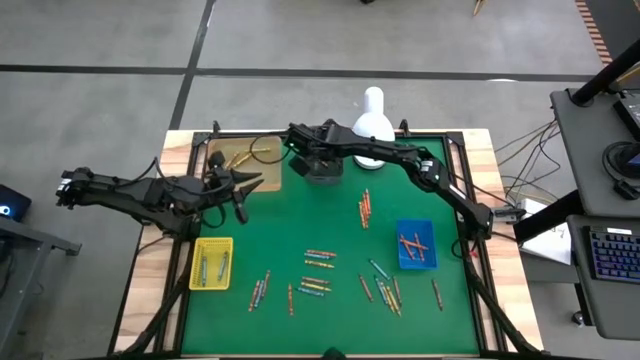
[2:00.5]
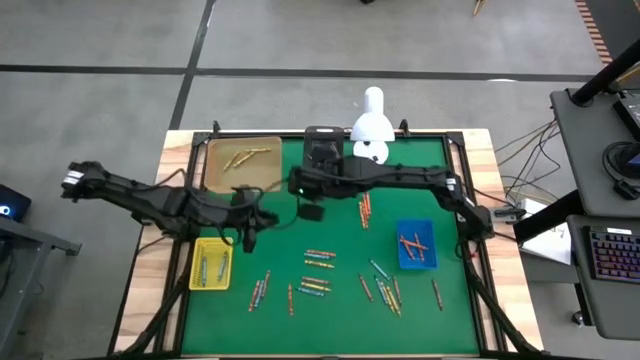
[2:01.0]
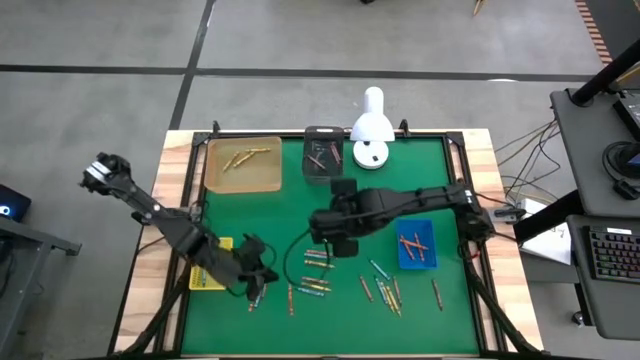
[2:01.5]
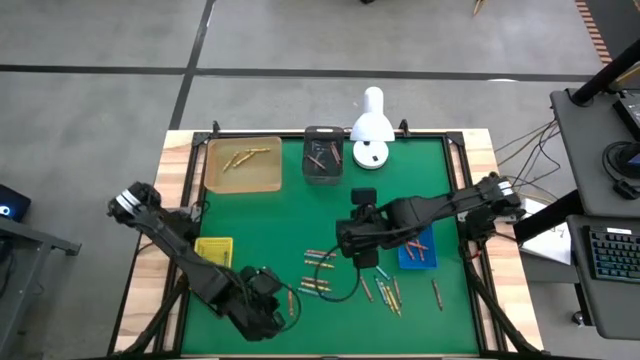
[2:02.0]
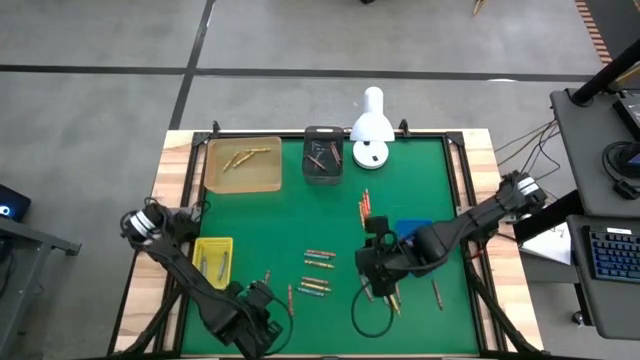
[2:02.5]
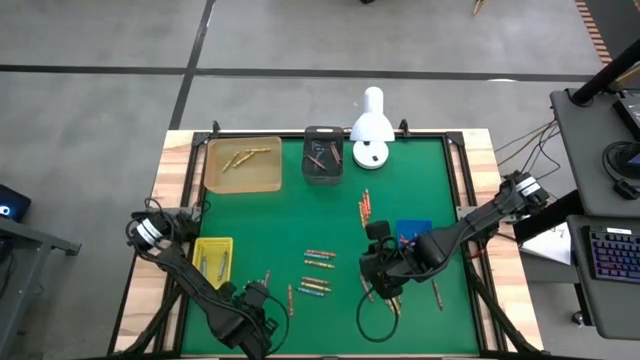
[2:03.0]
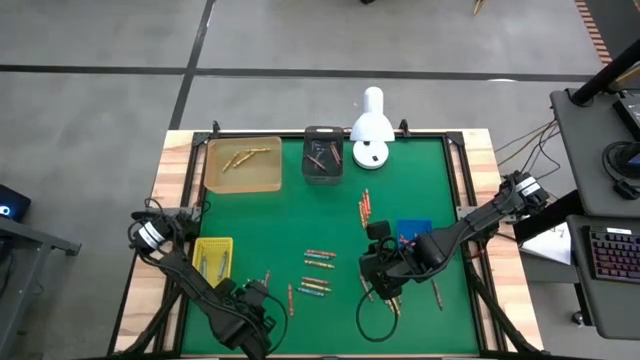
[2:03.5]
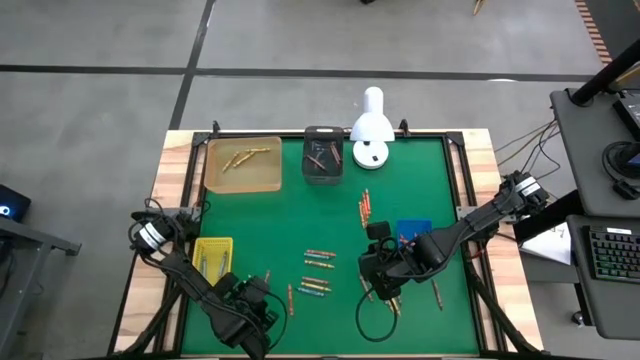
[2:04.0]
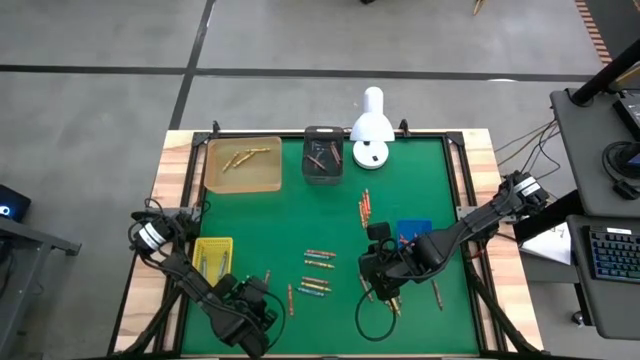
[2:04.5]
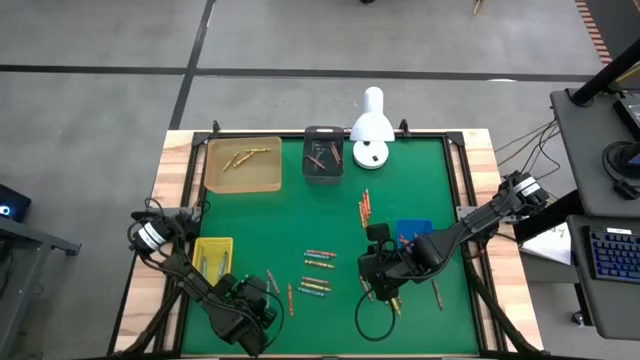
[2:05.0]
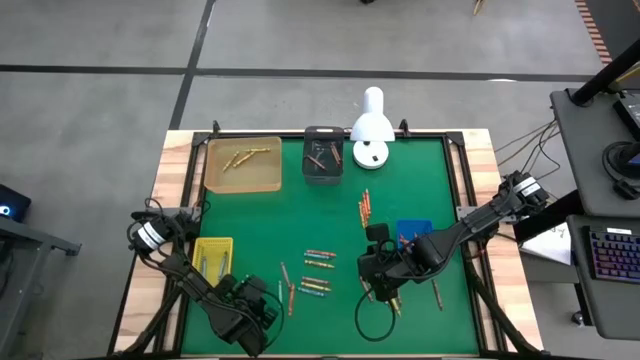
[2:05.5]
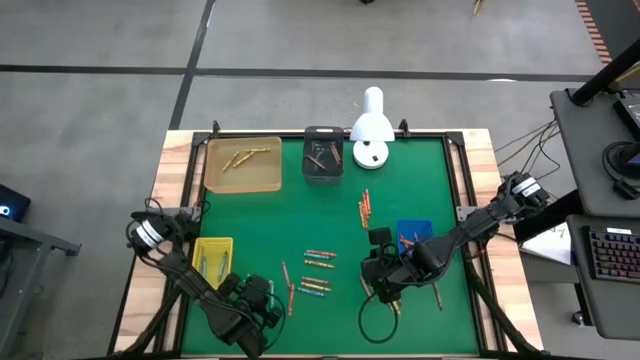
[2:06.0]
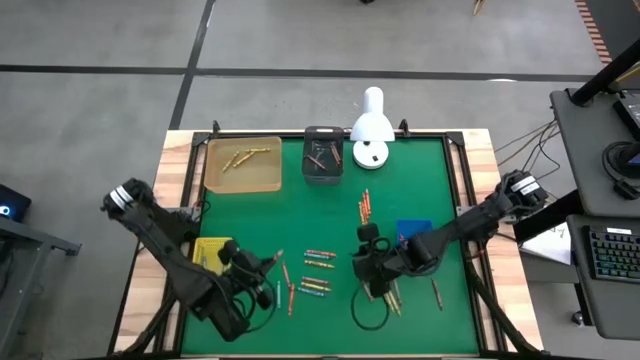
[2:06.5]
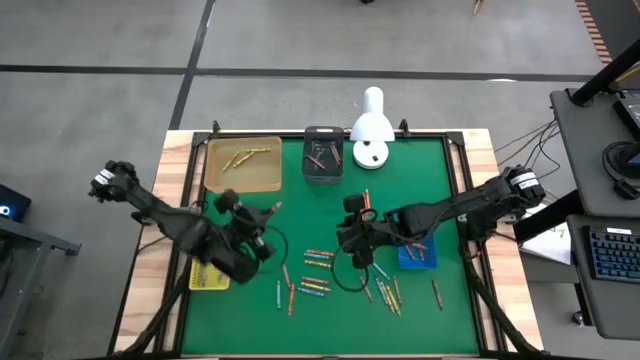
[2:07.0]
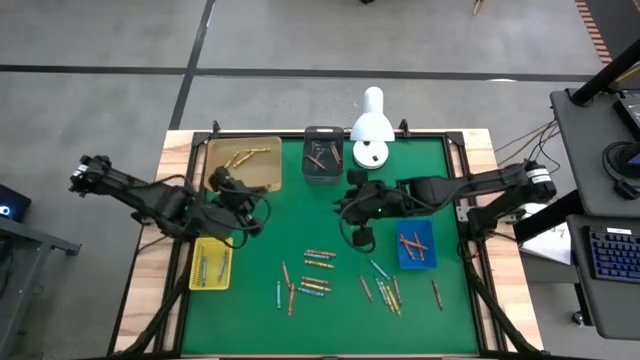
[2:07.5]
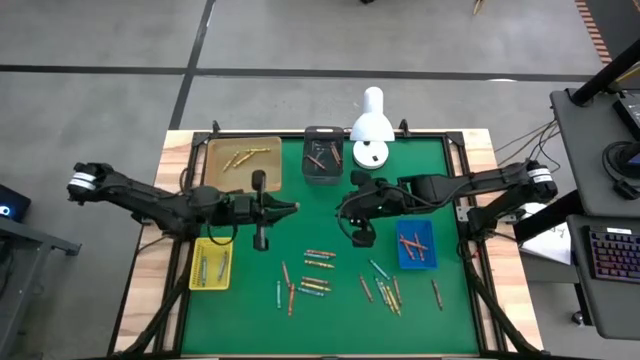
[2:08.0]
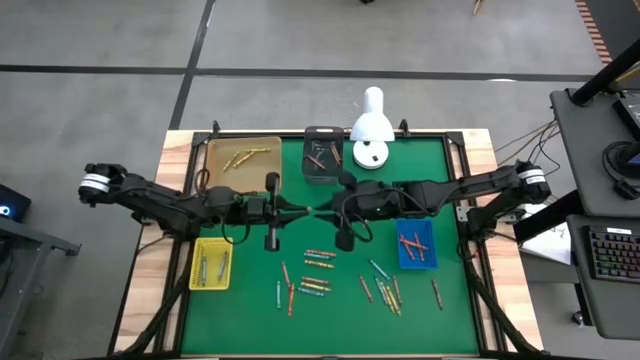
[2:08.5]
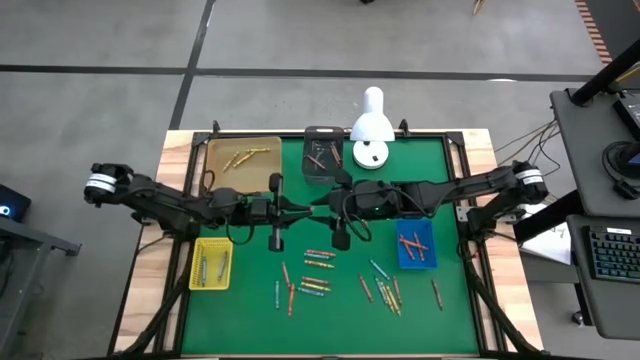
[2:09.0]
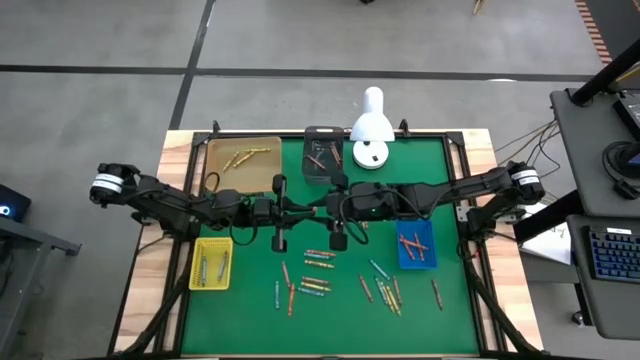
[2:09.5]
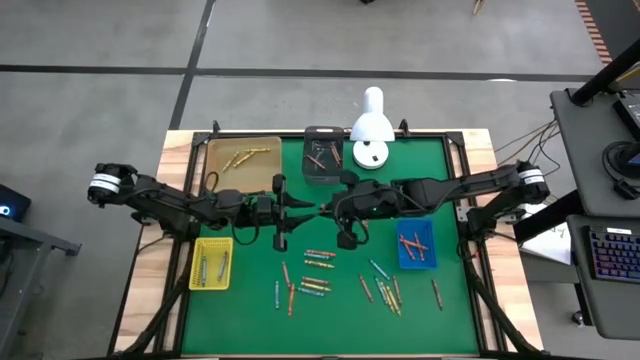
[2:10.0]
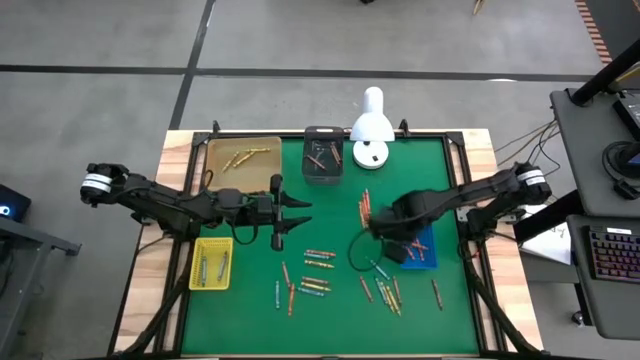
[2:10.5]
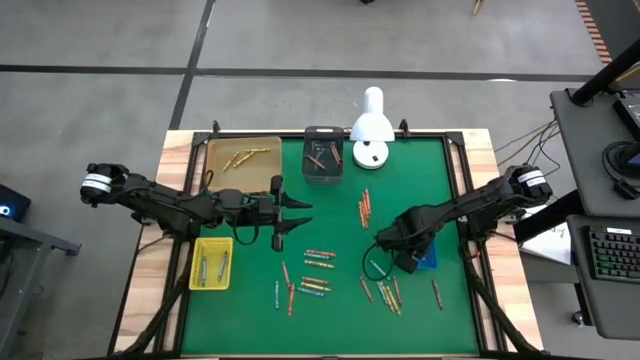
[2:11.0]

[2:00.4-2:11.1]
Task: Sort crayons
Put the orange crayon into the blue bin

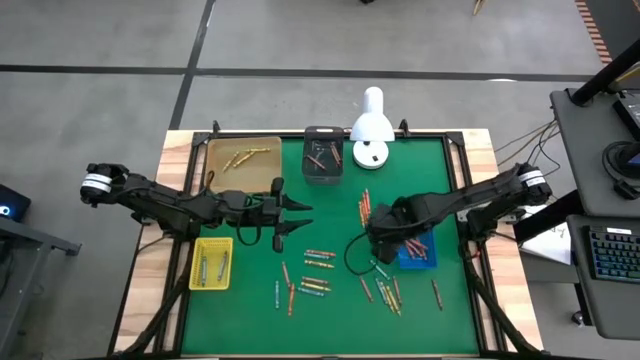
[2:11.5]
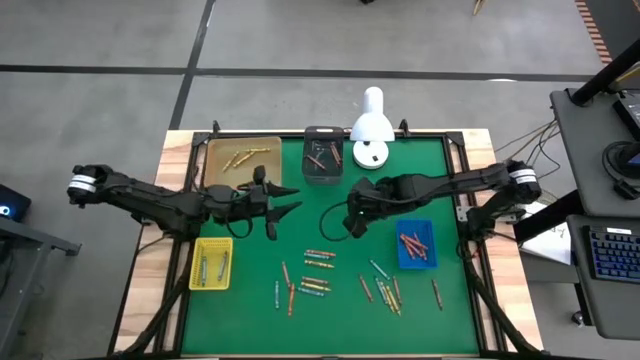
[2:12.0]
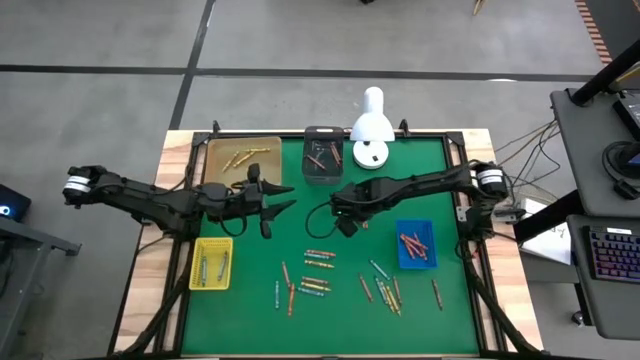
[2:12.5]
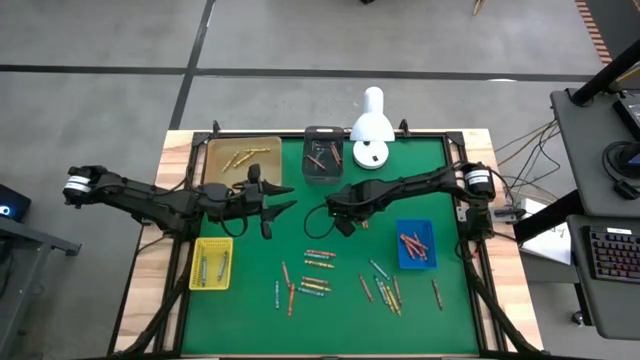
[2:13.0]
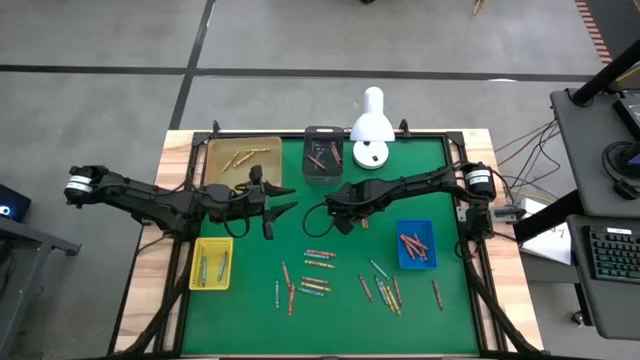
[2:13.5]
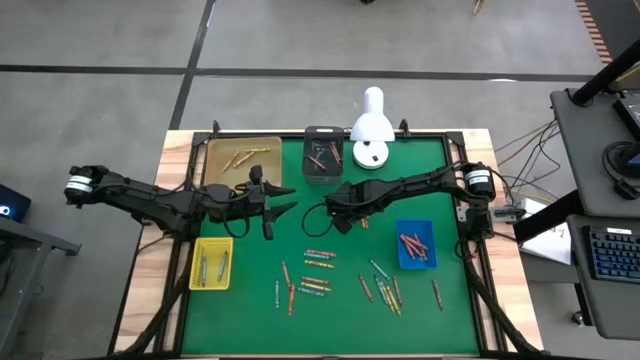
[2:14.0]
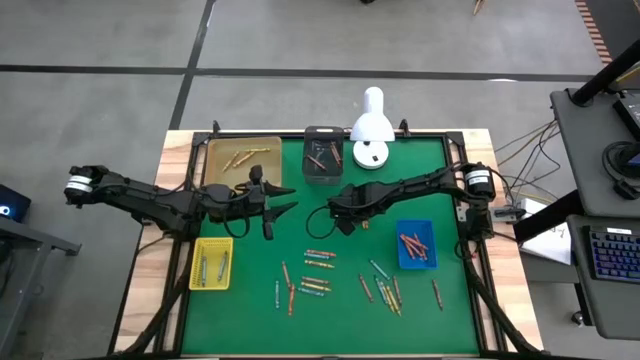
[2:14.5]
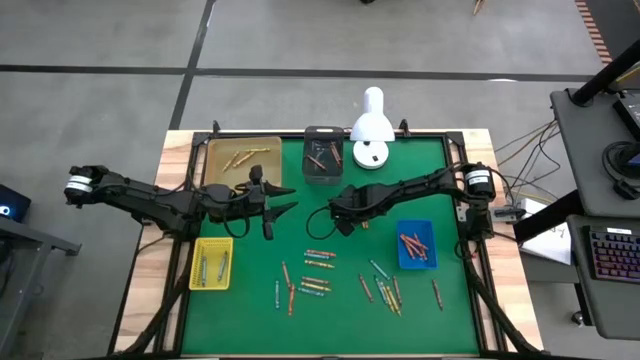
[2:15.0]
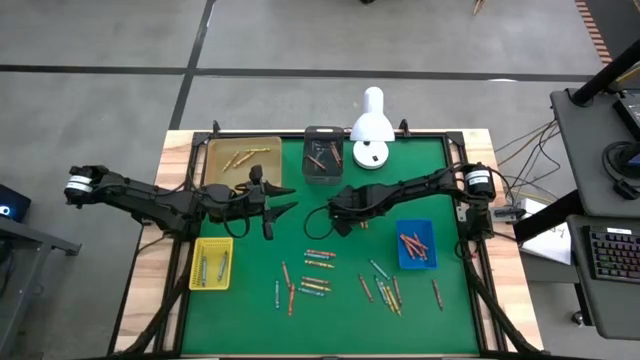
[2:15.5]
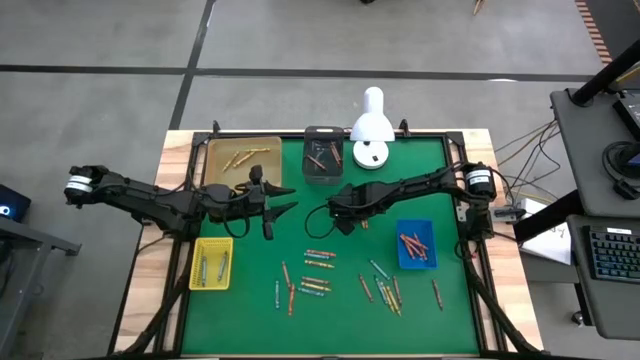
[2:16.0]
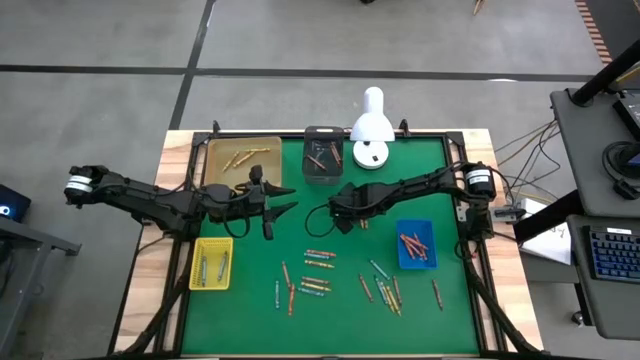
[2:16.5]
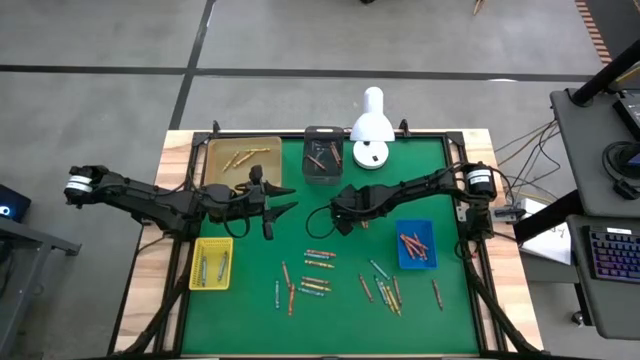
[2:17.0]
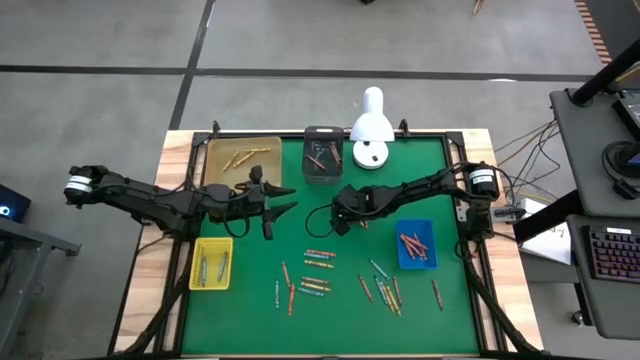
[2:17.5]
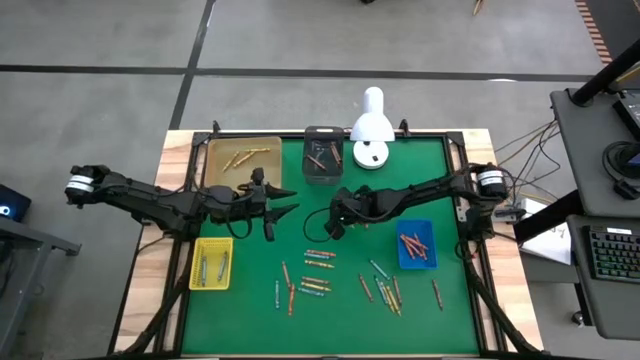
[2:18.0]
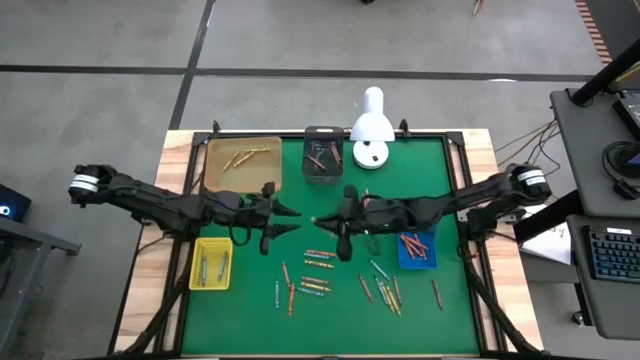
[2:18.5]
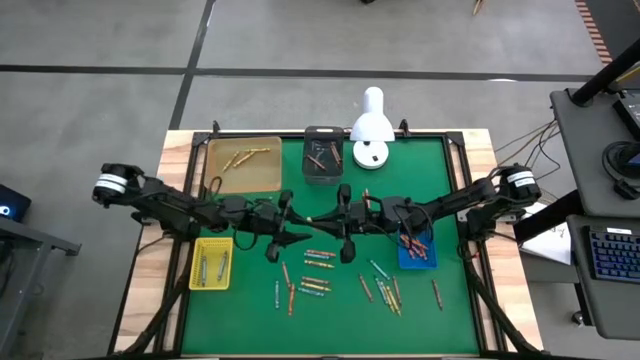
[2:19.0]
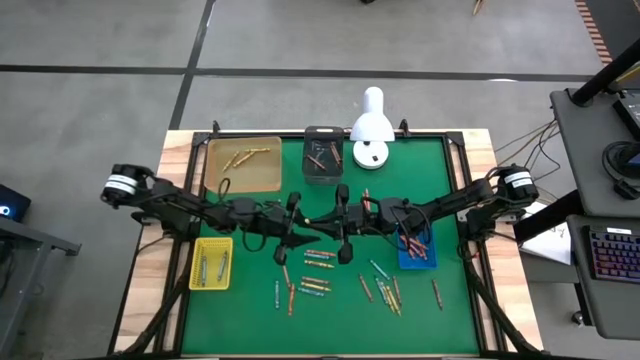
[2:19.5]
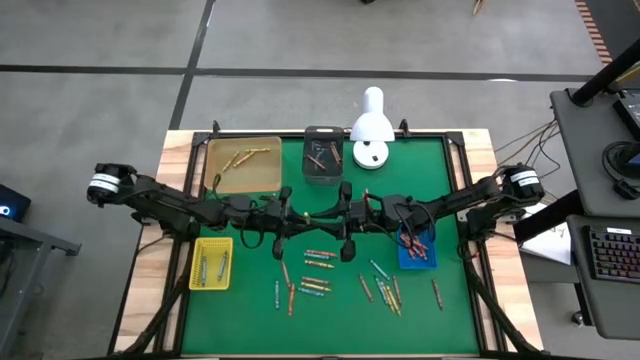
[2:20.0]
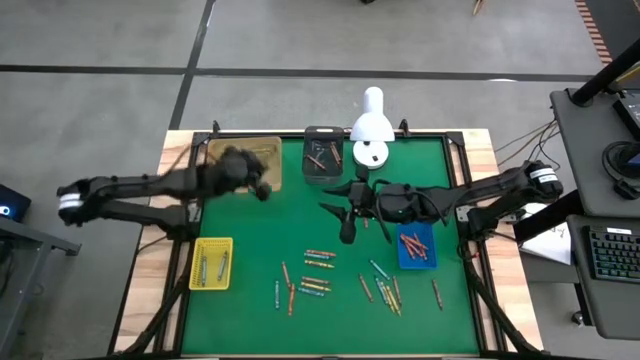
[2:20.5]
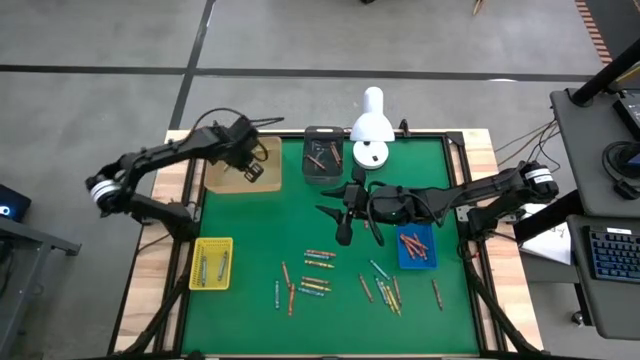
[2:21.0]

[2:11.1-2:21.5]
Put the green crayon into the orange bin

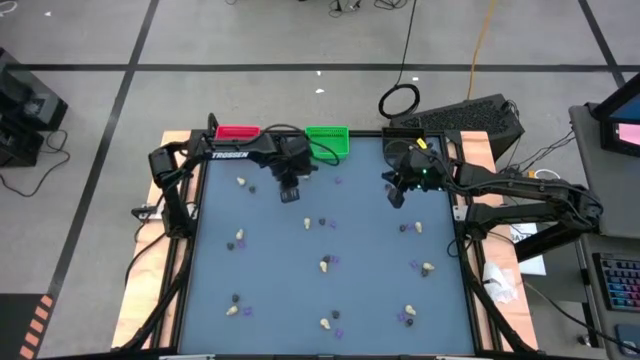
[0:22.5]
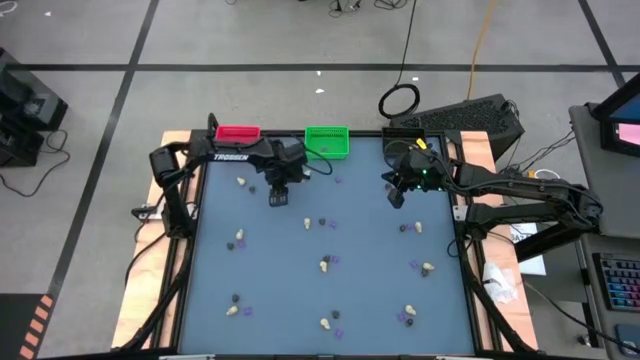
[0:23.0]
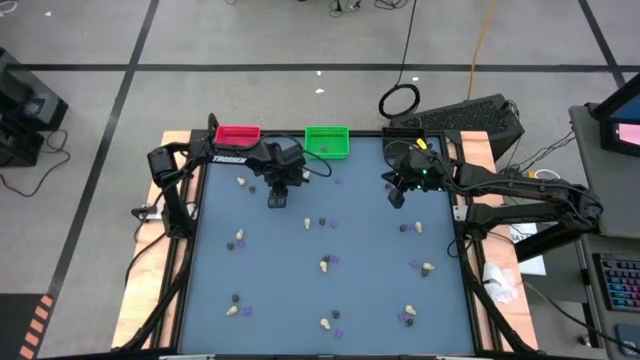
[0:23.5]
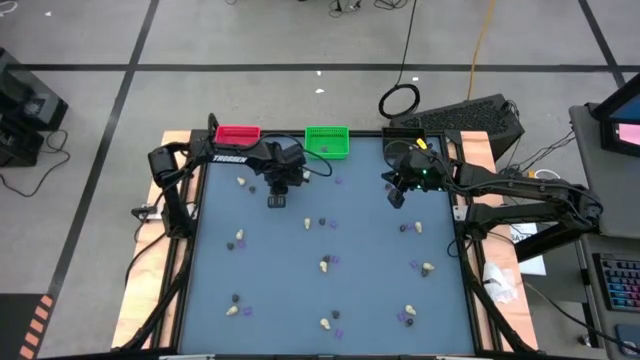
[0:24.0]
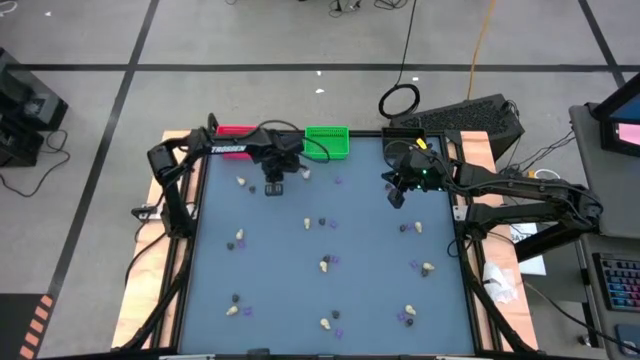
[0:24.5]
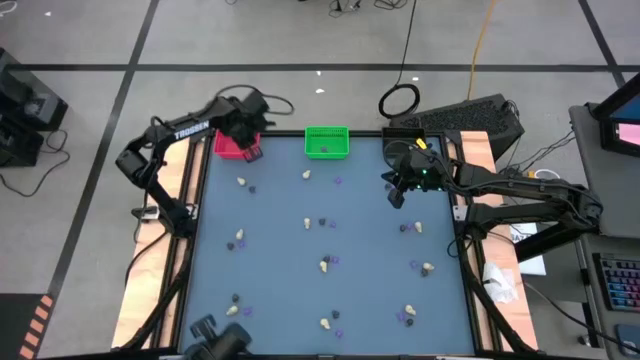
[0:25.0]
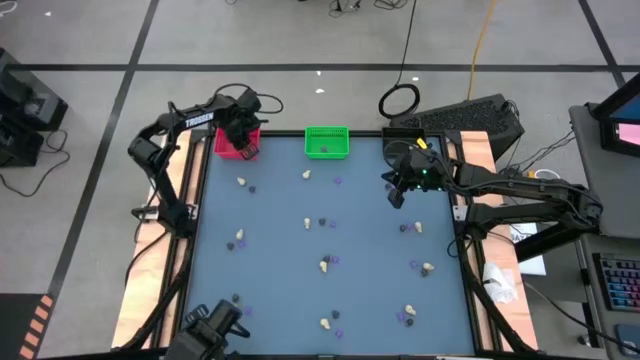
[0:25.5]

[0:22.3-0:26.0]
Task: Sort Halloween decoration
Put the black skull toy into the red bin
